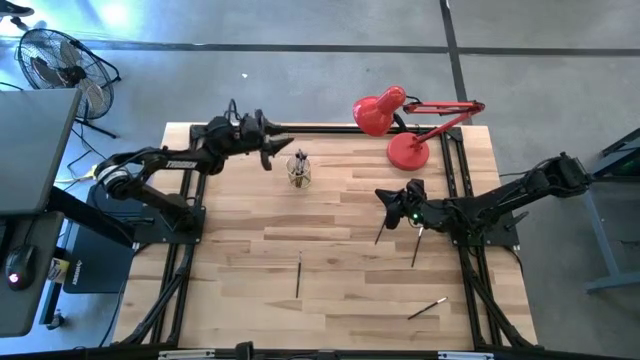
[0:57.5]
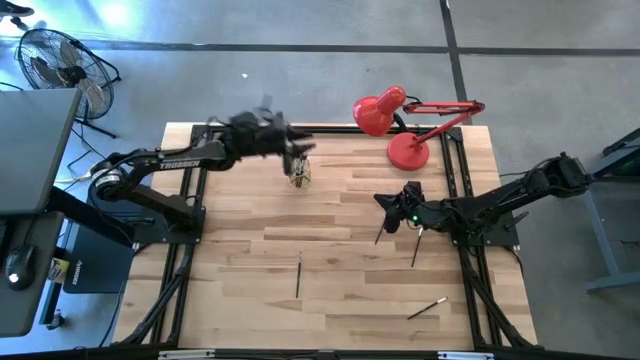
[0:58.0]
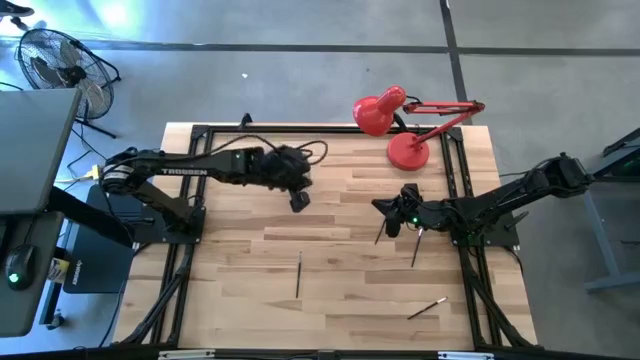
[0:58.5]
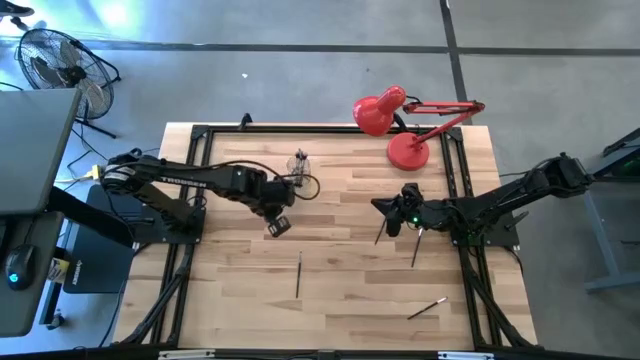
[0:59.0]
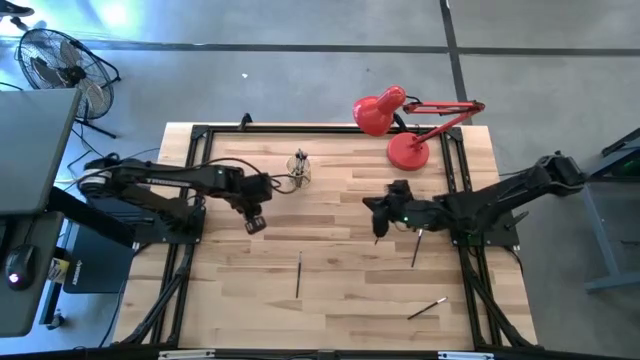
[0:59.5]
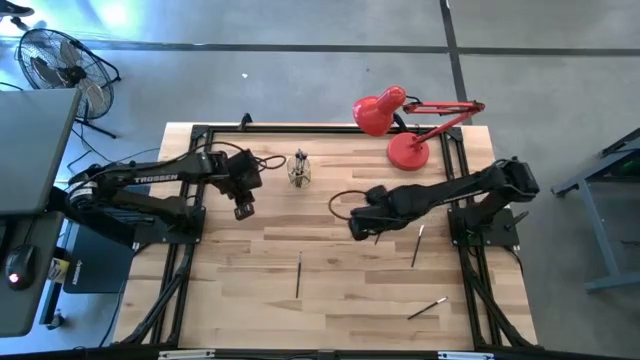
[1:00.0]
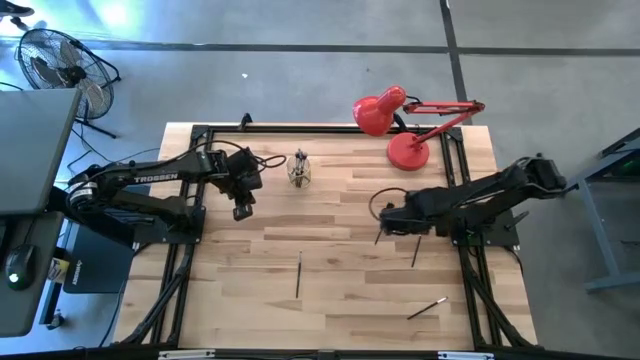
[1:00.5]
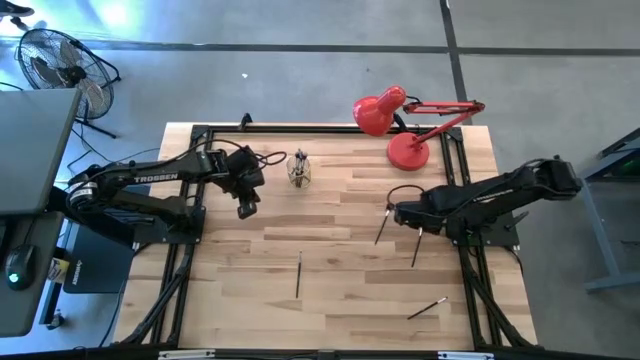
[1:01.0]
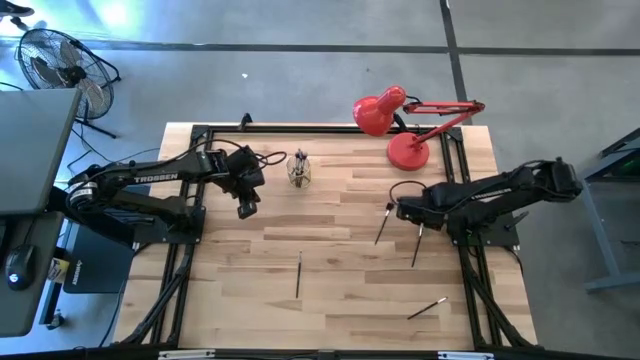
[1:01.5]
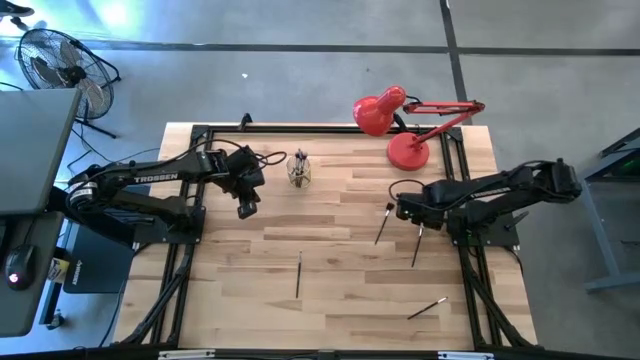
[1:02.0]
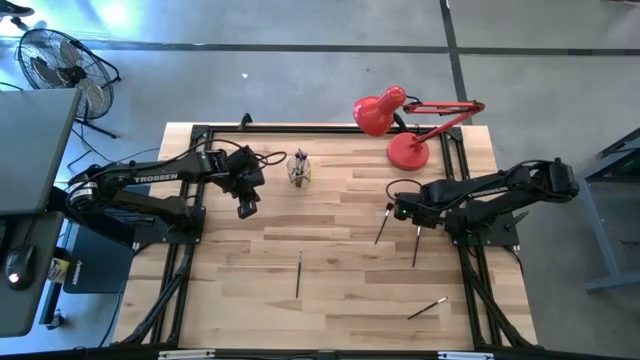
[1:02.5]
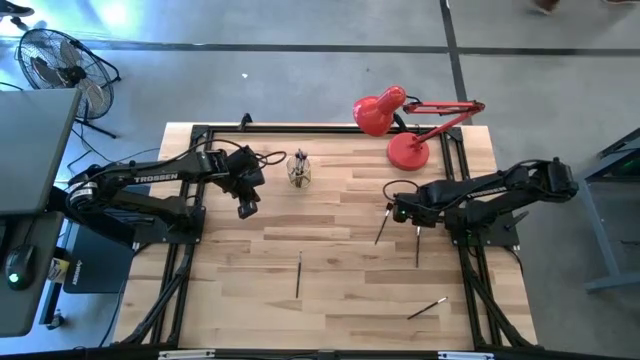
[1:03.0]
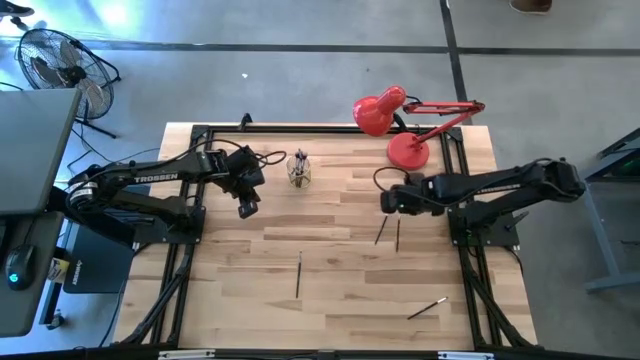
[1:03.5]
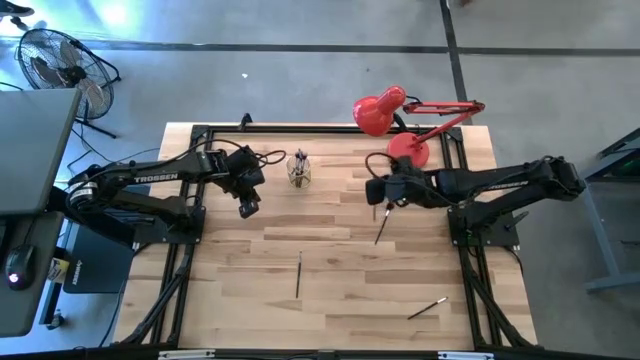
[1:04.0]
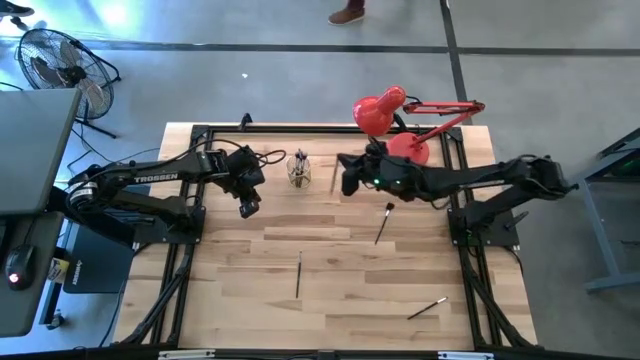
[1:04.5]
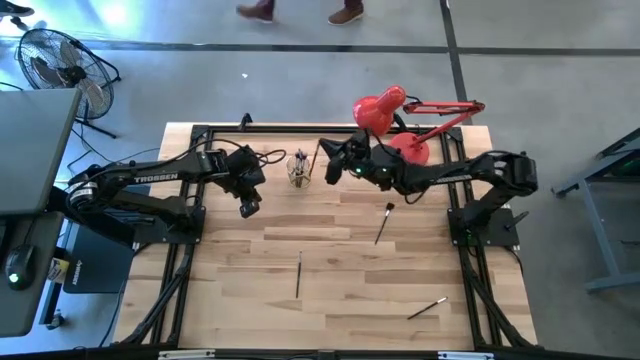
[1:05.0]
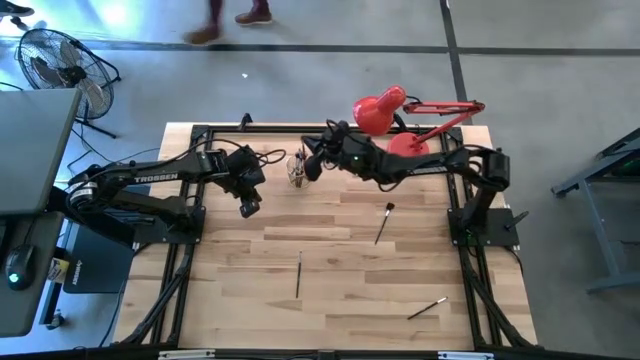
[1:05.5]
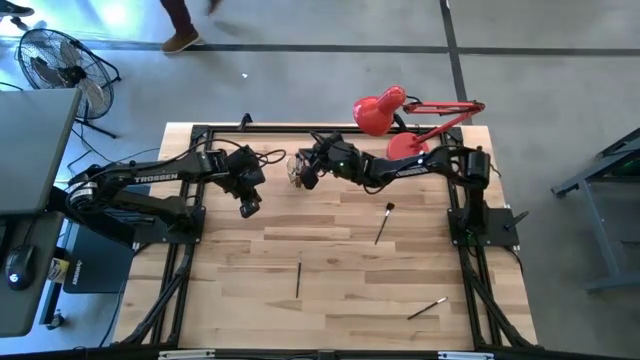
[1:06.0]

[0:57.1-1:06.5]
Task: Put items in baskets/containers
Put the eyeshadow brush into the wire organizer

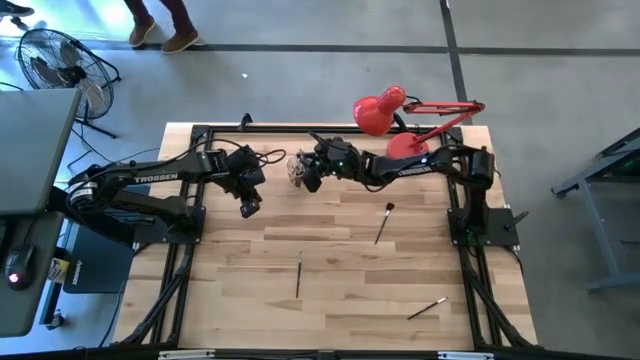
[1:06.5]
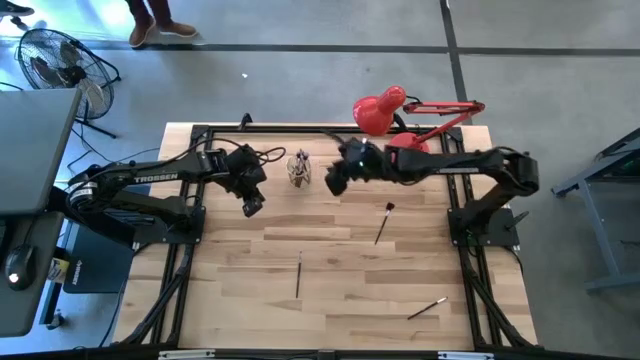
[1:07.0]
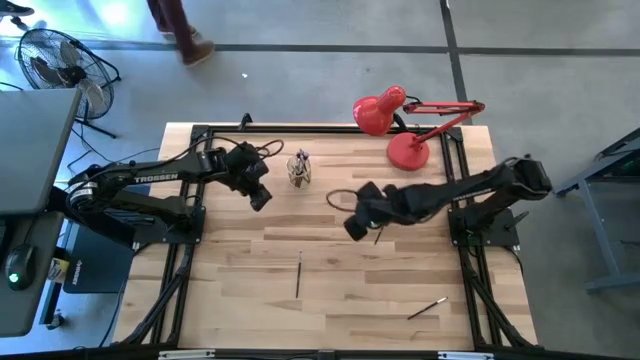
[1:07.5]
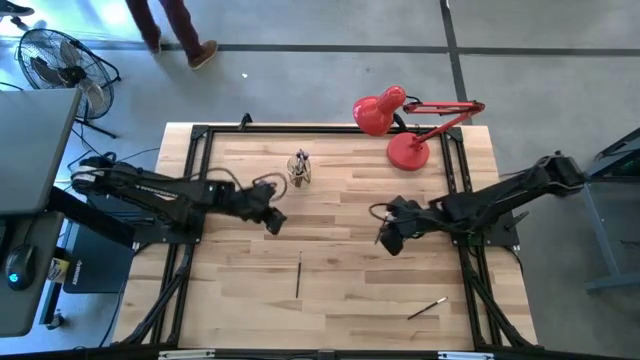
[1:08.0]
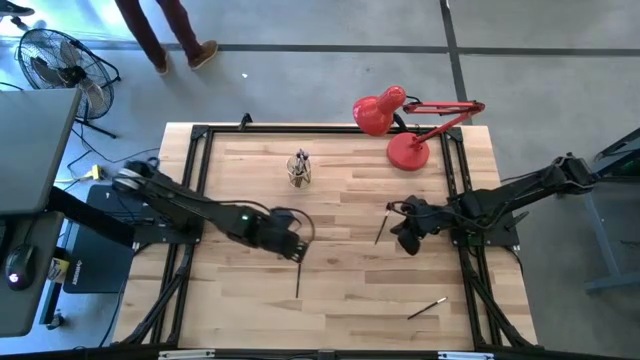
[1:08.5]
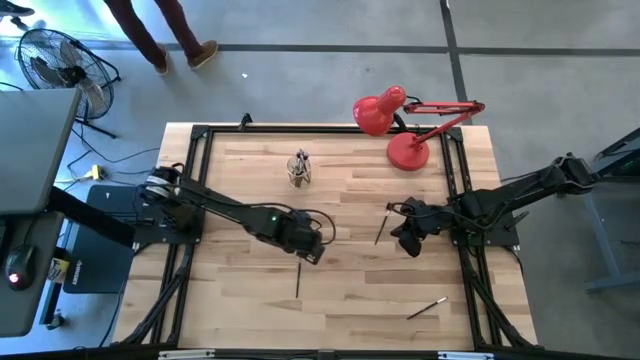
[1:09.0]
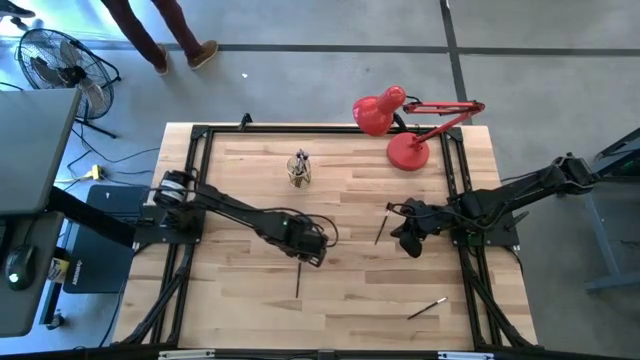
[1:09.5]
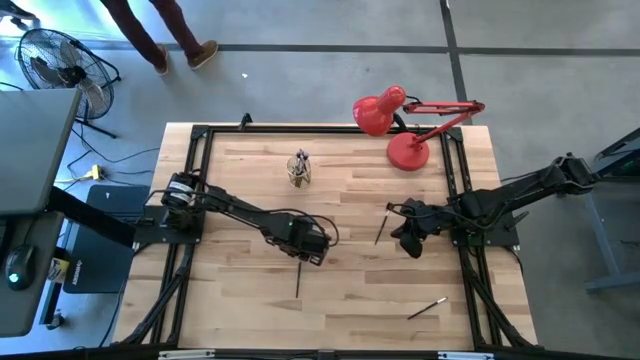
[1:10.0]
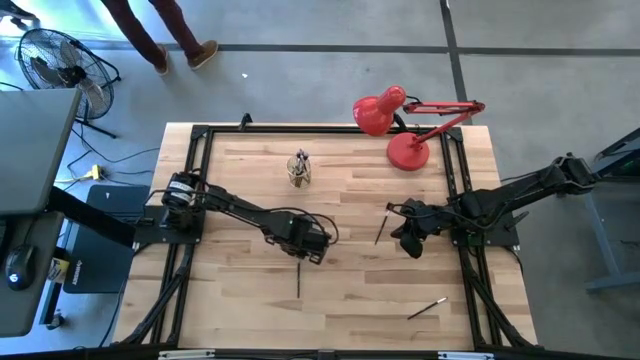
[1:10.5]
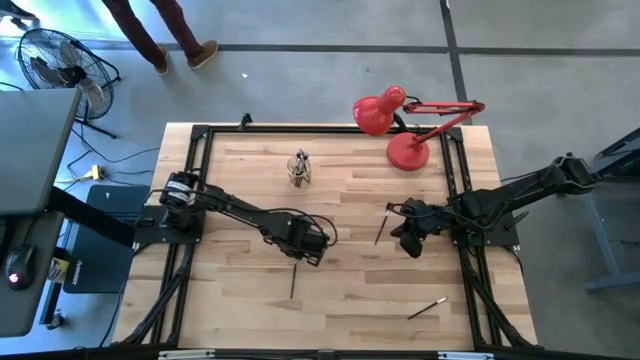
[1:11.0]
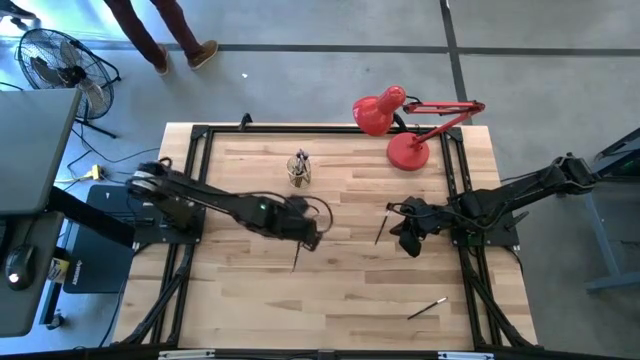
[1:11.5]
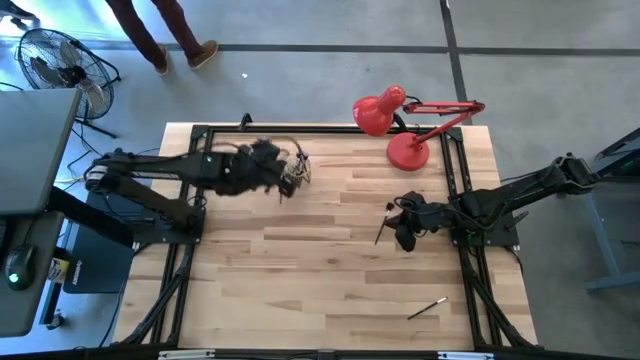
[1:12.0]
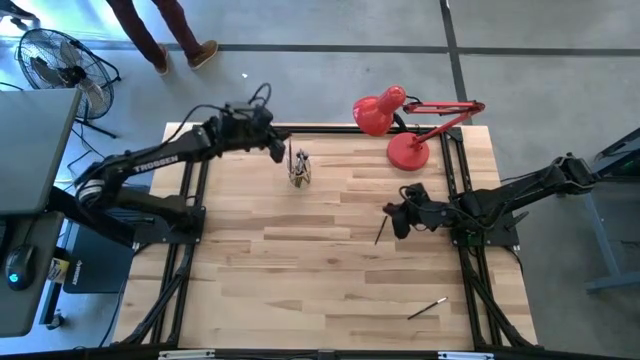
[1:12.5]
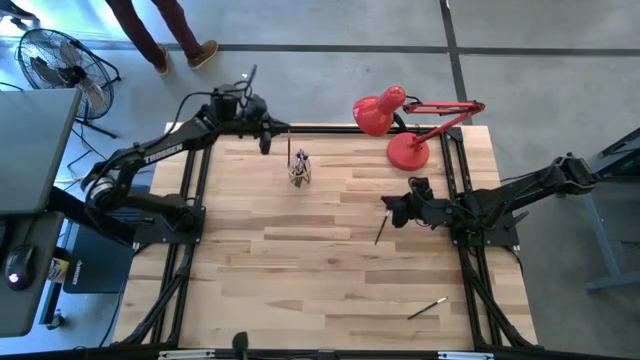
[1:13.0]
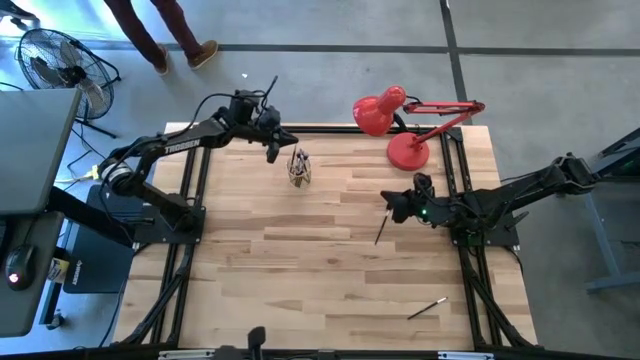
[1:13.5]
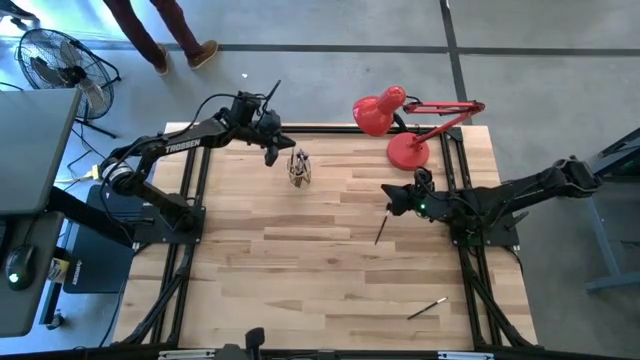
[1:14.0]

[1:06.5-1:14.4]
Put the eyeshadow brush into the wire organizer

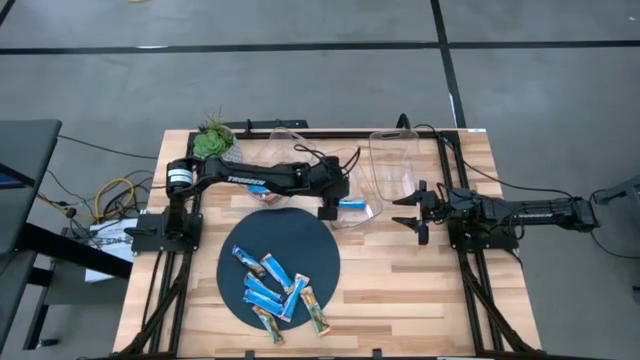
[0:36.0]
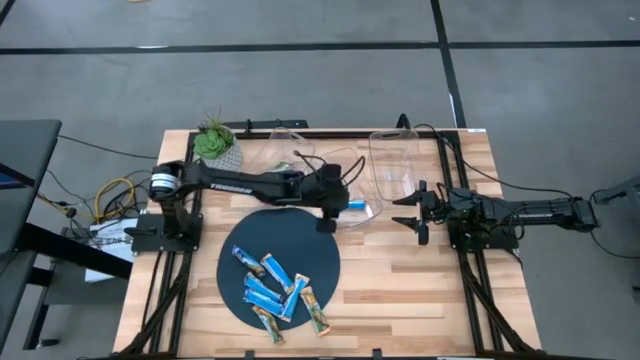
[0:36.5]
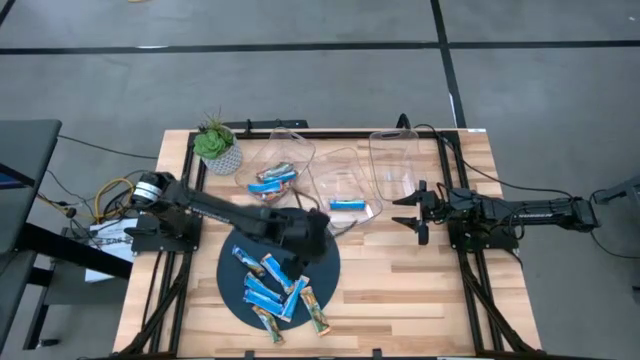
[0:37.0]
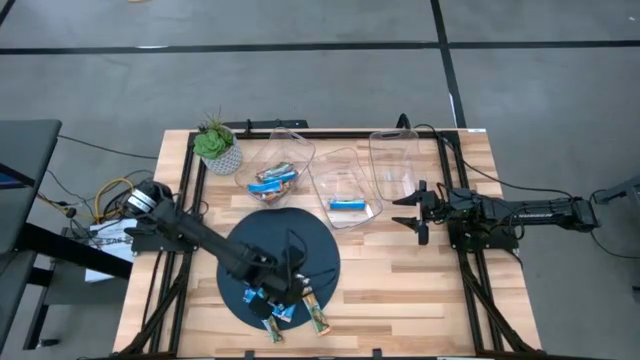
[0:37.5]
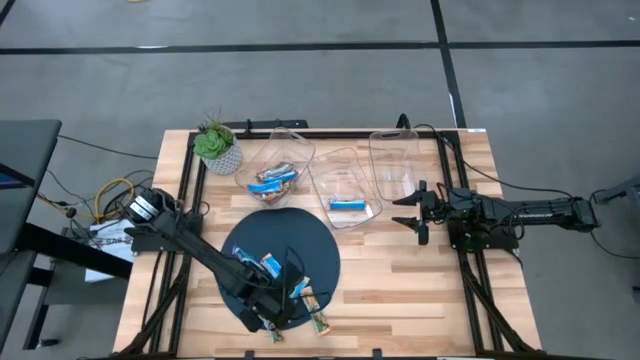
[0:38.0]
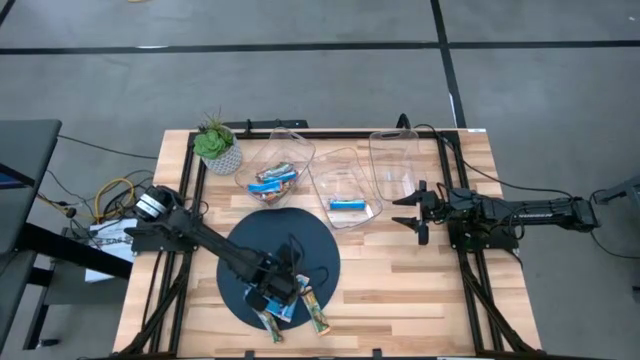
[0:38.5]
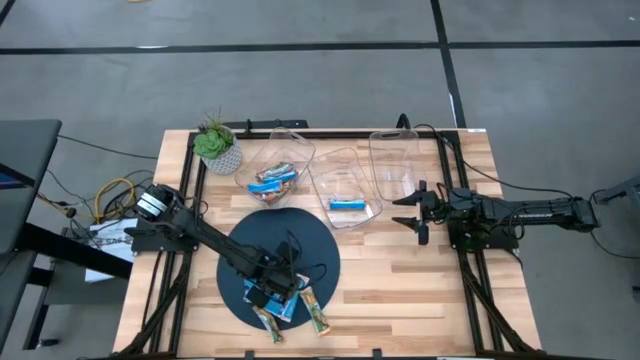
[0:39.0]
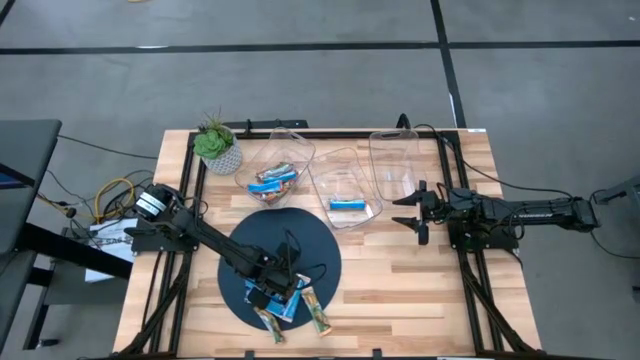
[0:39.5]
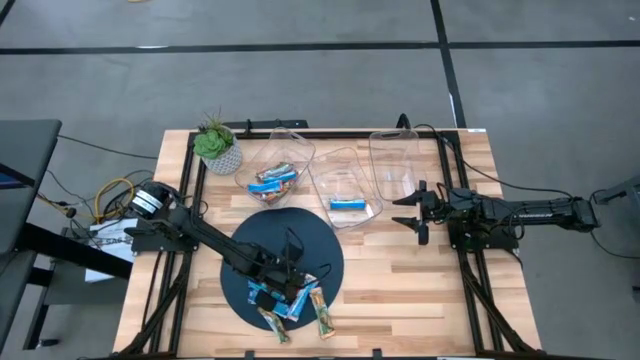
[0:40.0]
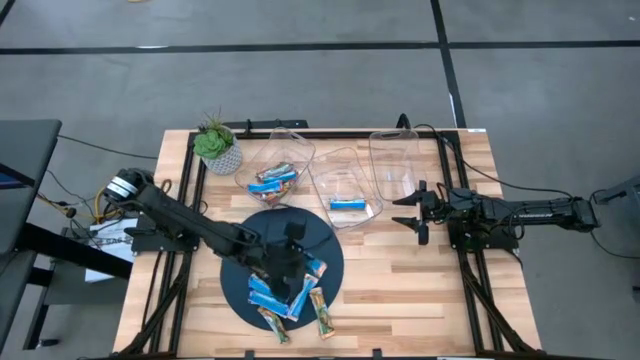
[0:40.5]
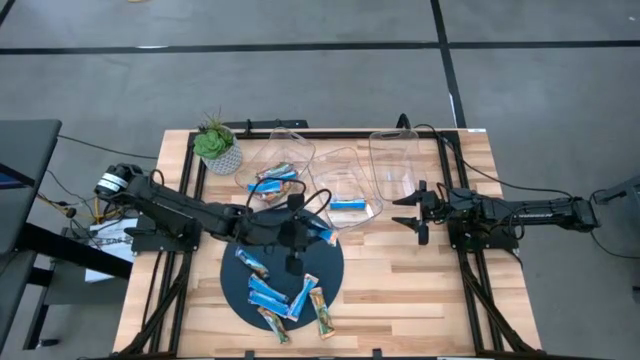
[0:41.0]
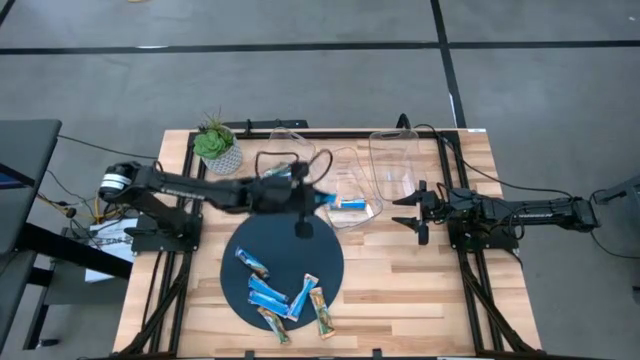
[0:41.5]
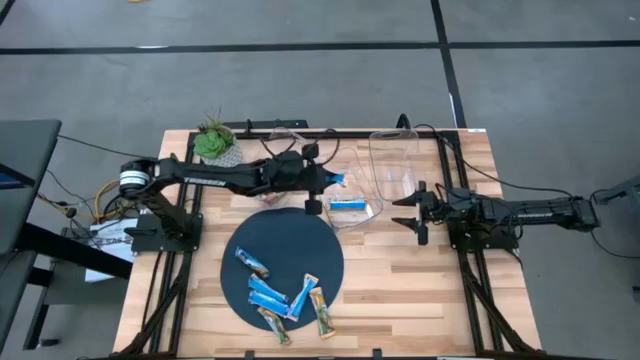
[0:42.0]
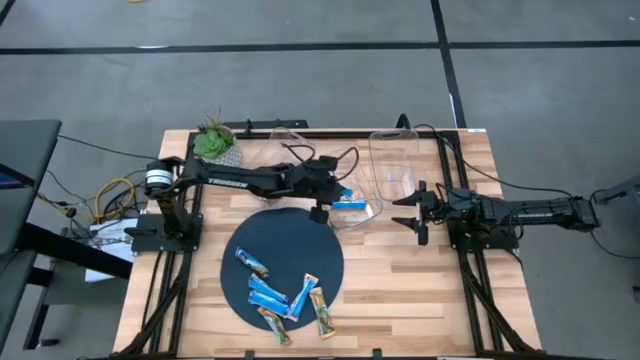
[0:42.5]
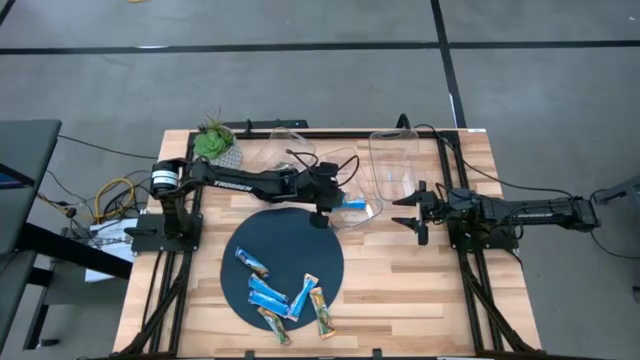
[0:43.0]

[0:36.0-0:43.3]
Task: Pick and place Granola Bars by type
Put the yellow granola bar into the middle transparent bin
